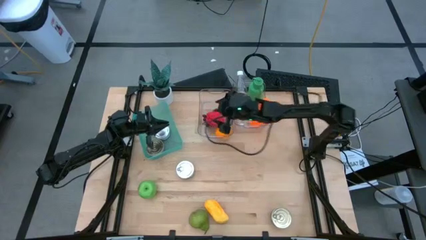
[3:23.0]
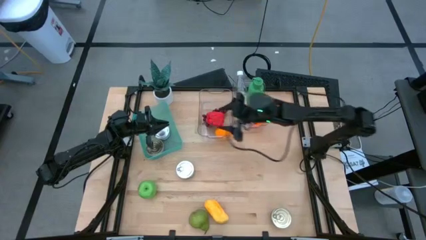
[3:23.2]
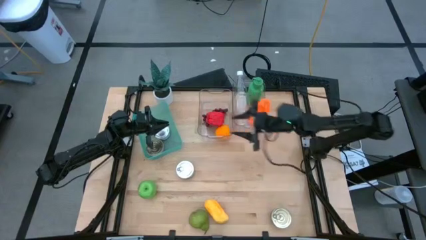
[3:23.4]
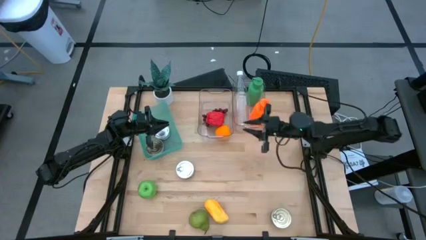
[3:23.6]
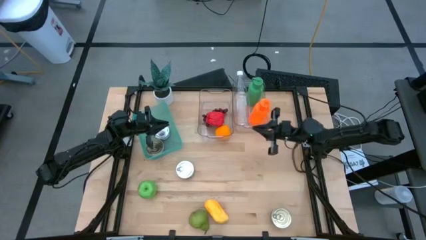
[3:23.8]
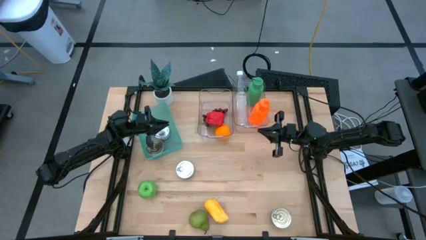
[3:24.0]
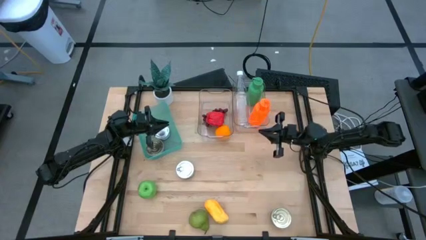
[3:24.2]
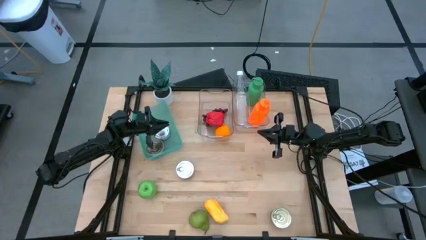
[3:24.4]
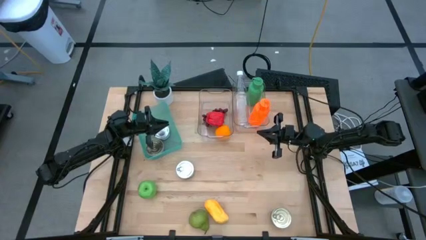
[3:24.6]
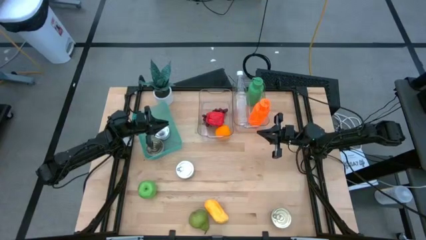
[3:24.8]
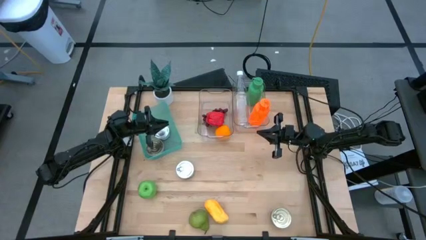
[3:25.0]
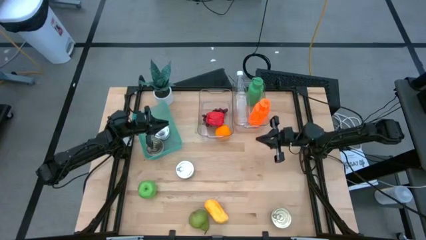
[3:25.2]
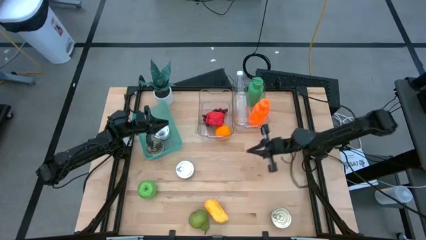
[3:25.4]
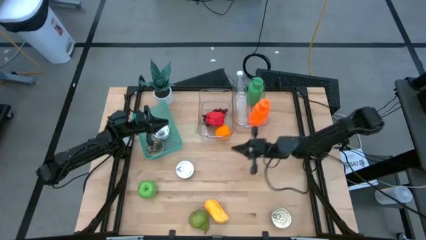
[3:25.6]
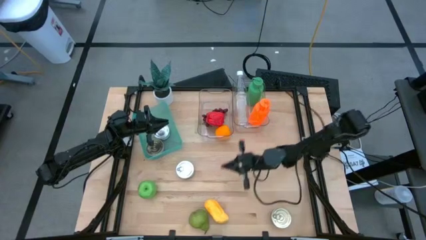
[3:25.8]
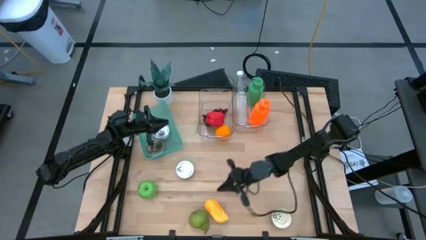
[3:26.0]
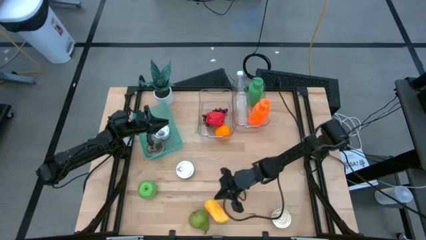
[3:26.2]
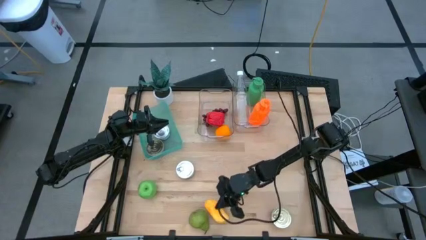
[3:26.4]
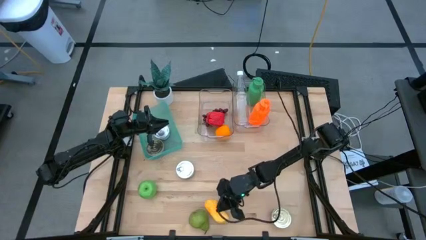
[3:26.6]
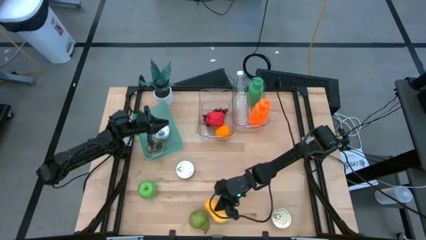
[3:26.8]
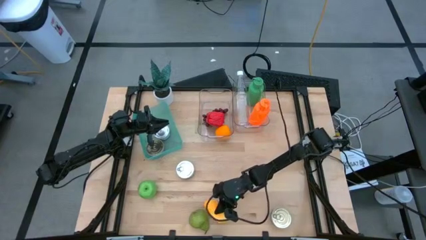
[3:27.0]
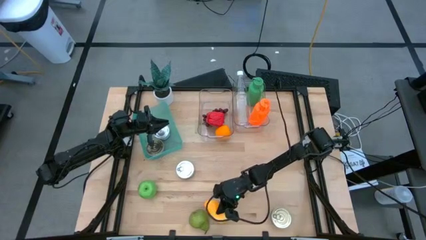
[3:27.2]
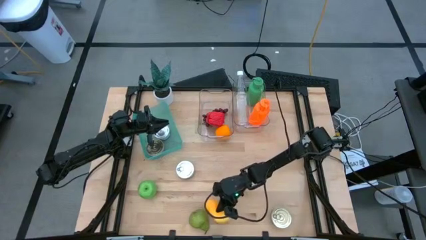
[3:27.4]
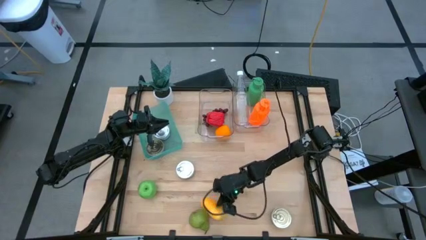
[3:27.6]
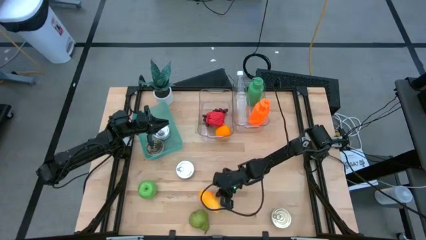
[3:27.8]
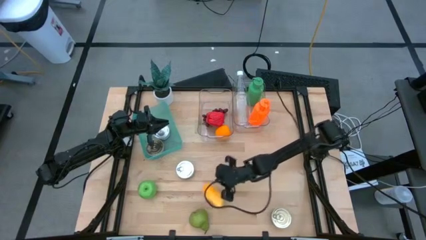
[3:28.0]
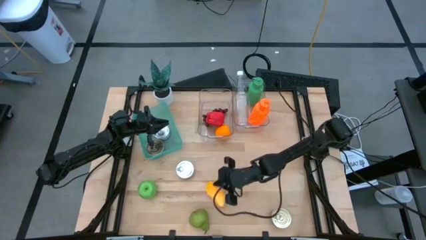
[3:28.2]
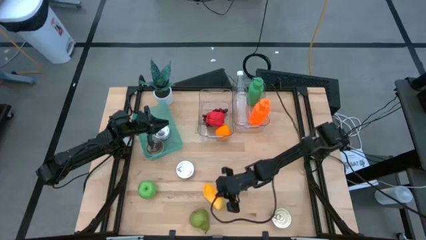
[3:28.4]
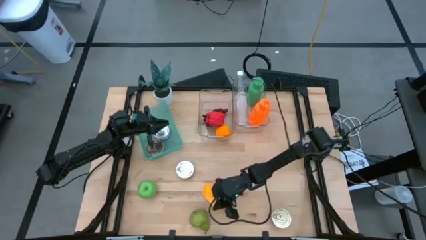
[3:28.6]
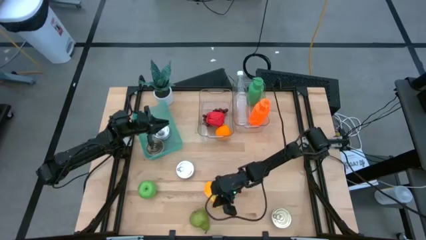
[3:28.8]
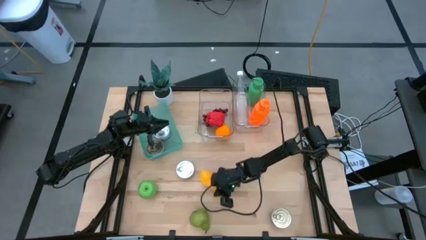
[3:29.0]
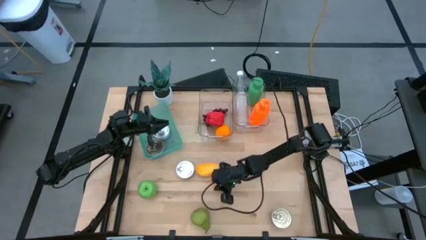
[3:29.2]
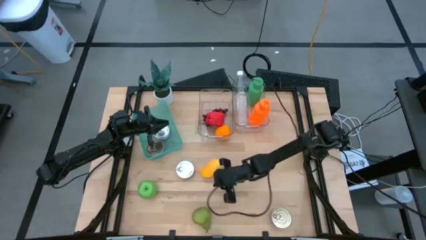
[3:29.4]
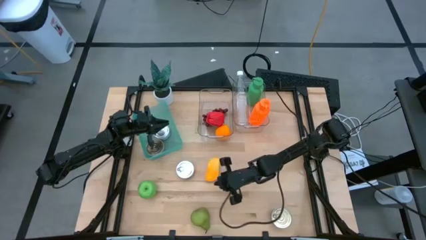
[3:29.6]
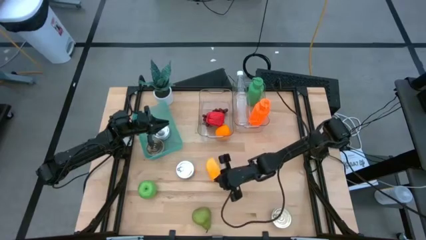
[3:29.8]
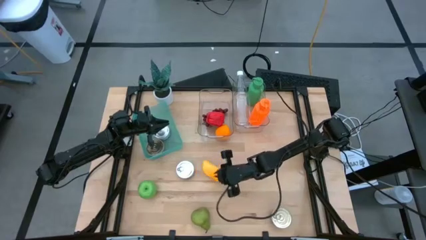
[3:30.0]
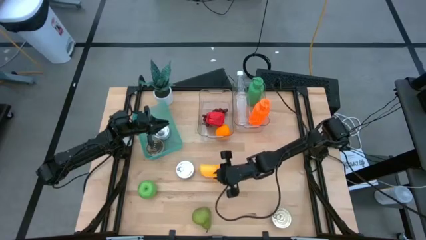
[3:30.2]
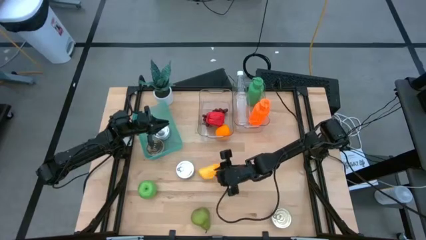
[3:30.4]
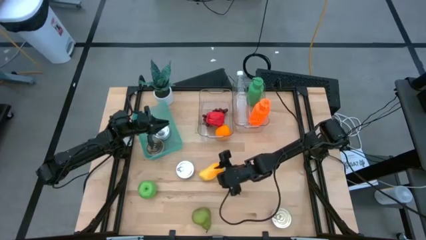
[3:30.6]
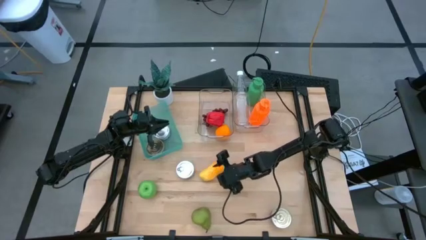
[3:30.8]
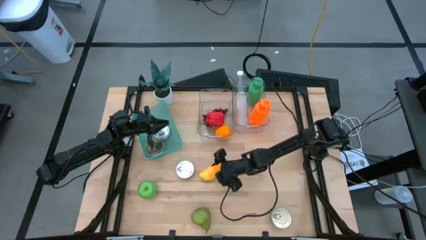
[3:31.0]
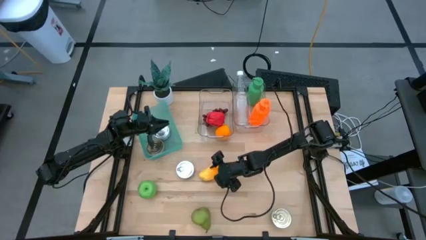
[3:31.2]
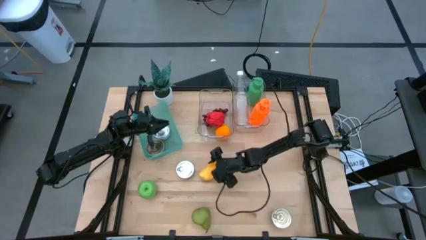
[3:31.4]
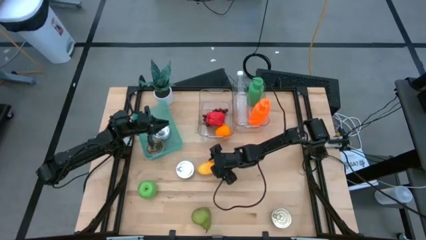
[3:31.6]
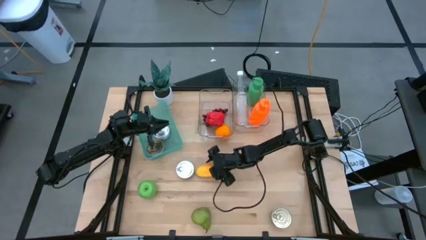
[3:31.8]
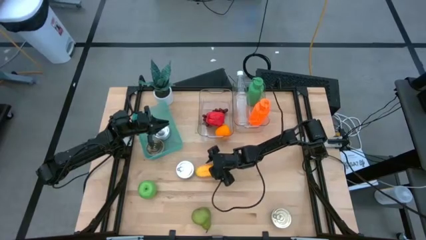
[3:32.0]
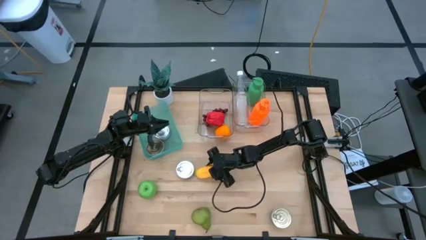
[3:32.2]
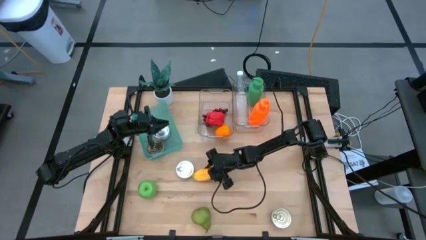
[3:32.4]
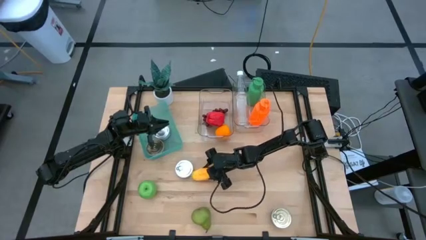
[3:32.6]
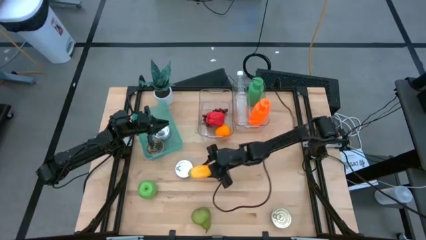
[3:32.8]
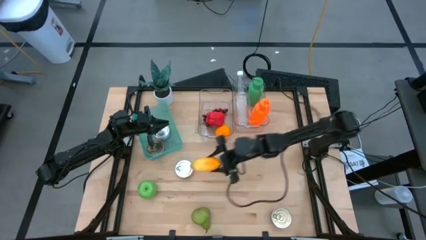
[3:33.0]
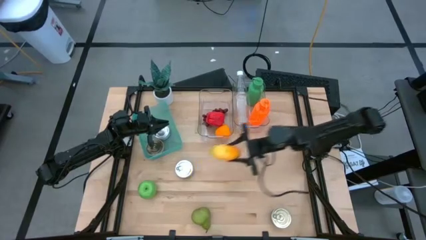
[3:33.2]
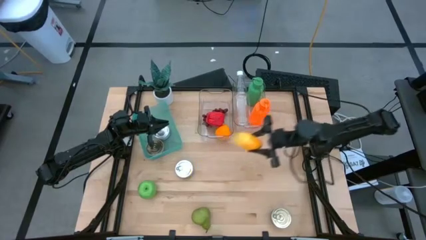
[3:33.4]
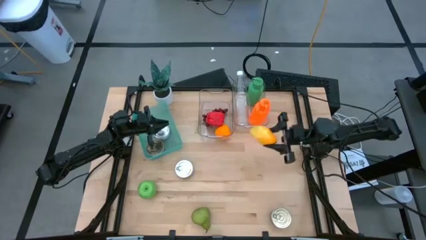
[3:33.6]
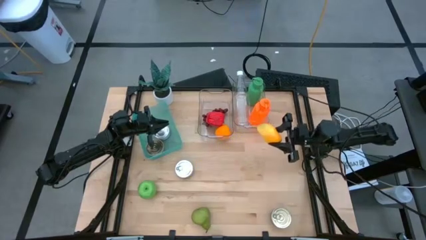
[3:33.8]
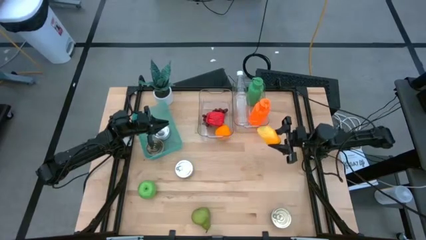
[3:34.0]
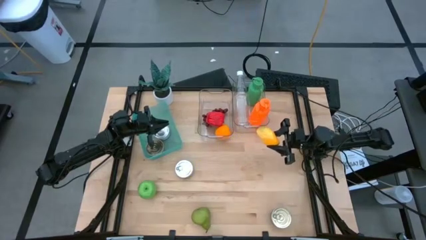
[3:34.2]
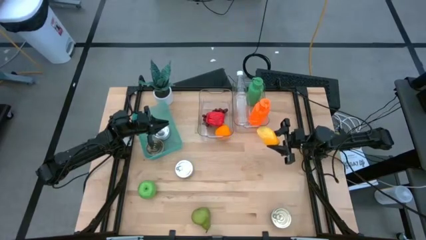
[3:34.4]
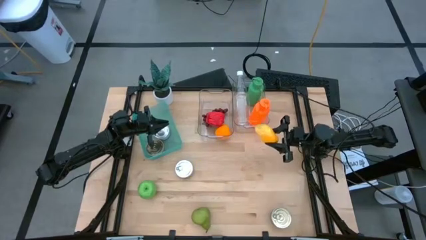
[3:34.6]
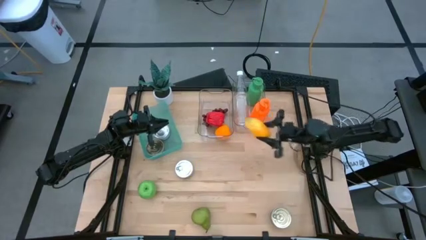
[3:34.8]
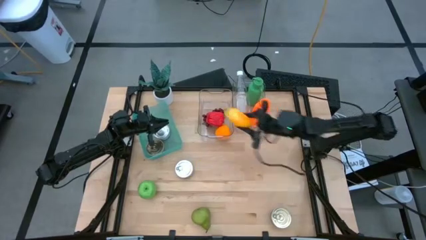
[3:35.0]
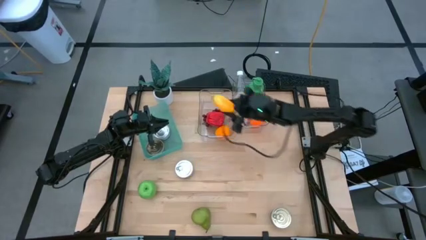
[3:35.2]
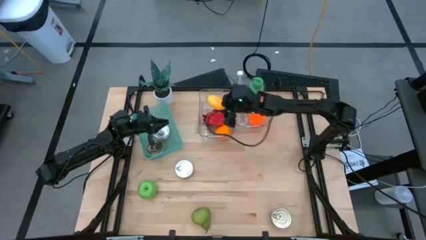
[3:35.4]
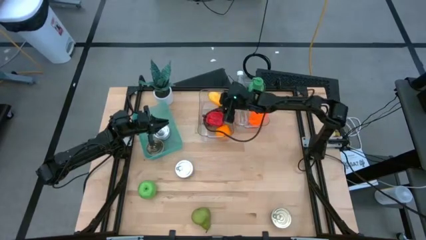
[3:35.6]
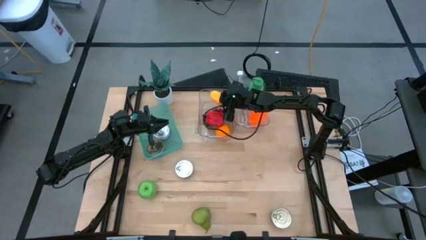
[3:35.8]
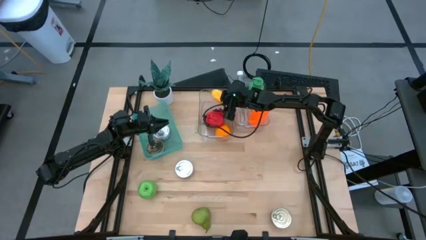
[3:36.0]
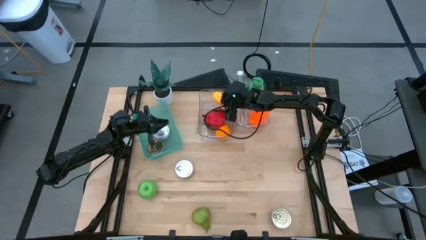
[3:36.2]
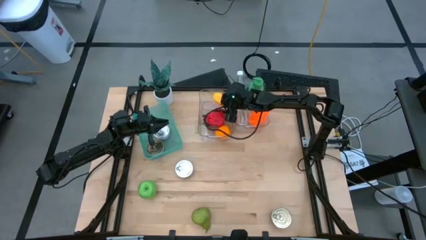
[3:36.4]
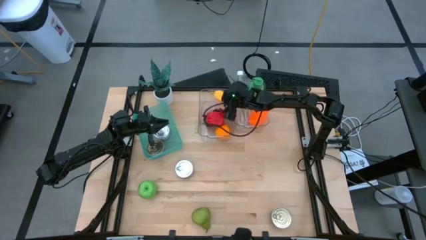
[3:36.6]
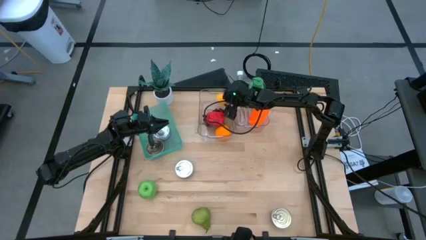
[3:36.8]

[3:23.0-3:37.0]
Task: Pick & Place Food Item
Put the mango into the left transparent bin
